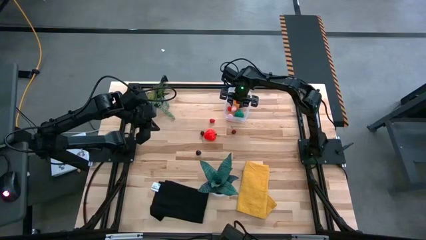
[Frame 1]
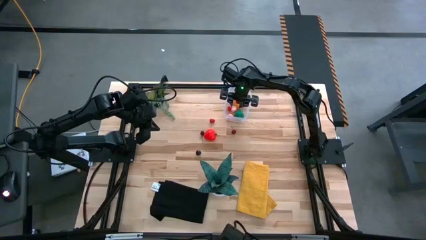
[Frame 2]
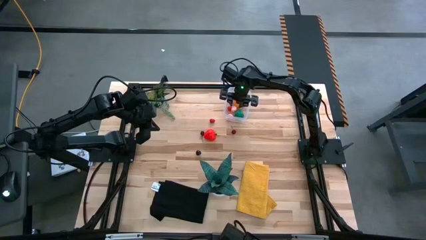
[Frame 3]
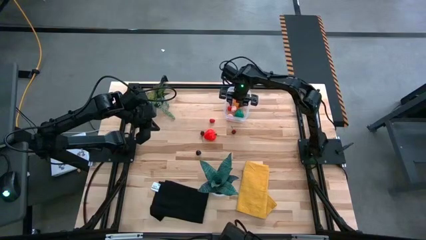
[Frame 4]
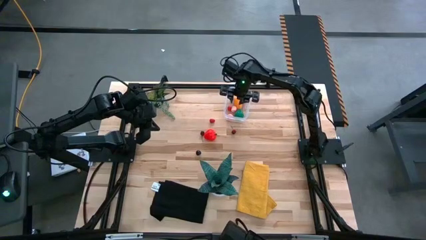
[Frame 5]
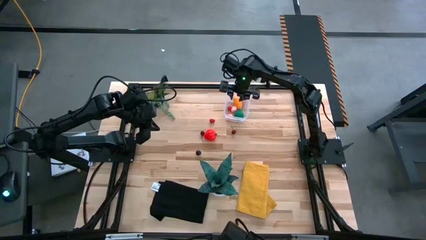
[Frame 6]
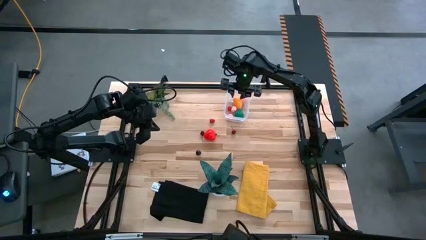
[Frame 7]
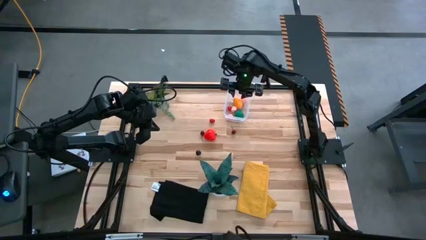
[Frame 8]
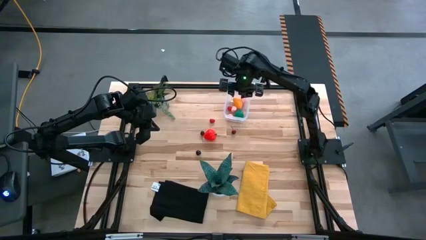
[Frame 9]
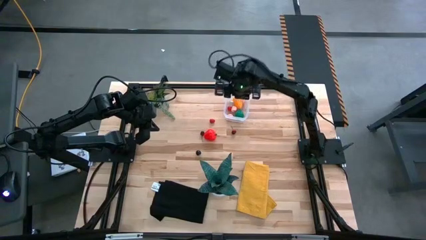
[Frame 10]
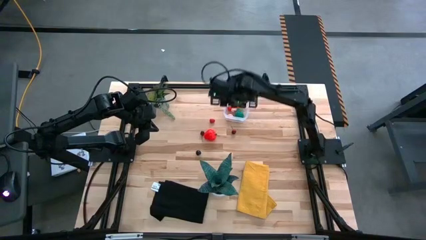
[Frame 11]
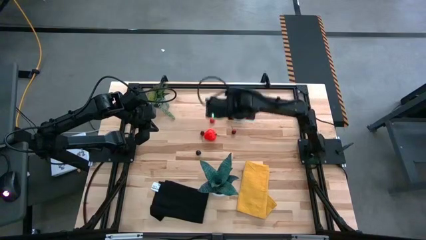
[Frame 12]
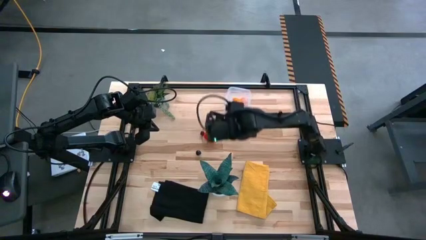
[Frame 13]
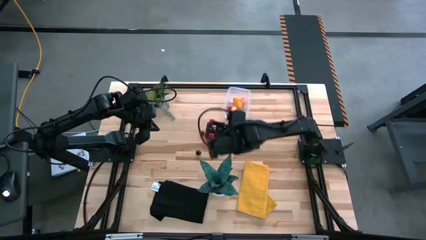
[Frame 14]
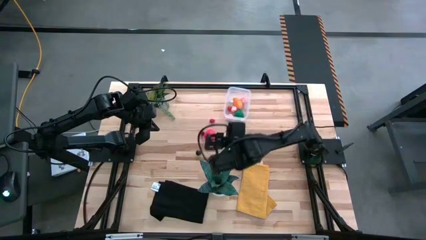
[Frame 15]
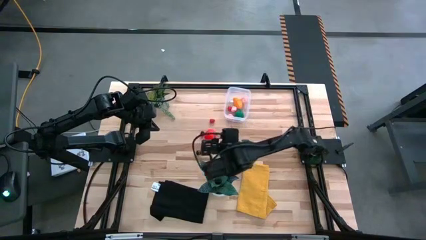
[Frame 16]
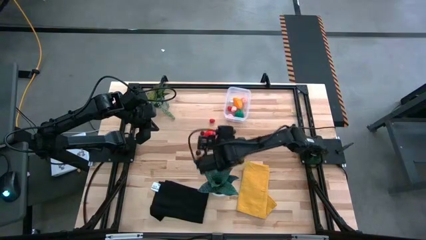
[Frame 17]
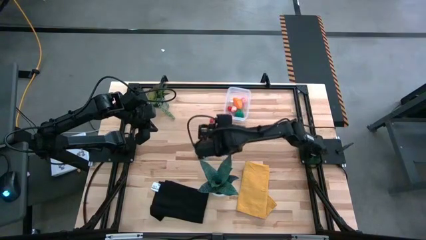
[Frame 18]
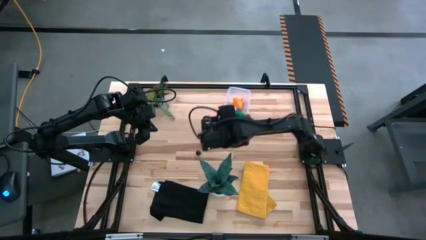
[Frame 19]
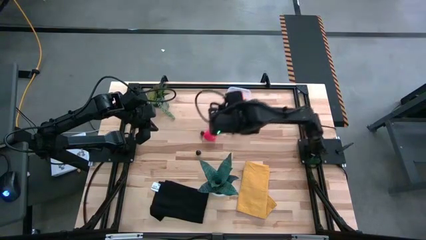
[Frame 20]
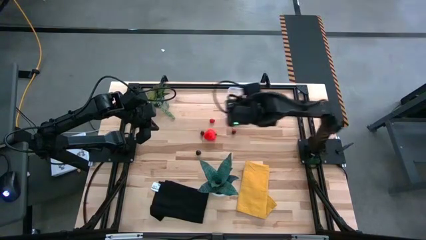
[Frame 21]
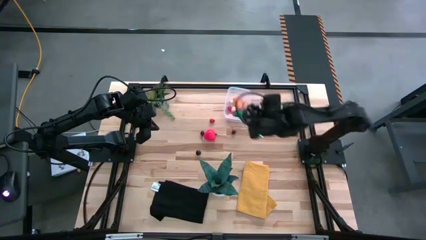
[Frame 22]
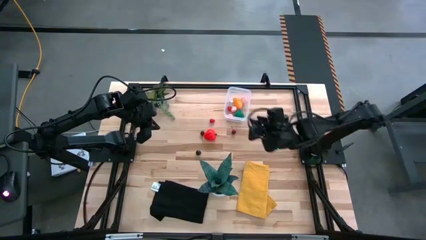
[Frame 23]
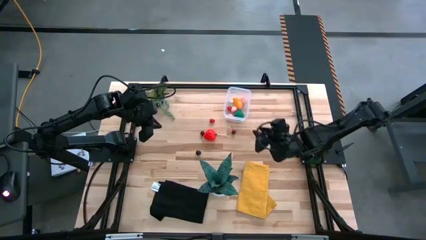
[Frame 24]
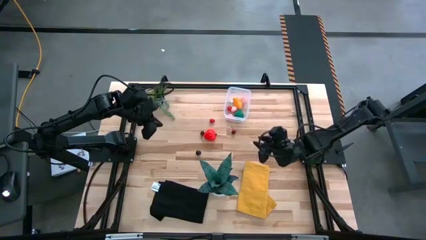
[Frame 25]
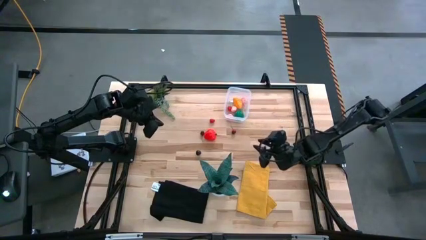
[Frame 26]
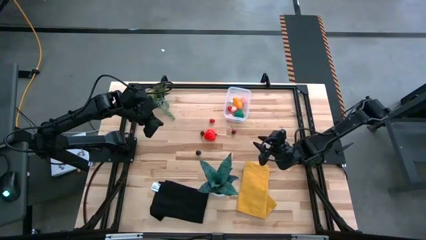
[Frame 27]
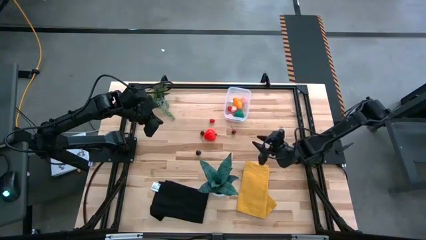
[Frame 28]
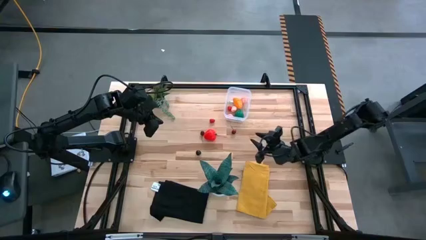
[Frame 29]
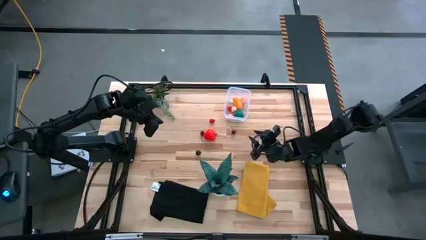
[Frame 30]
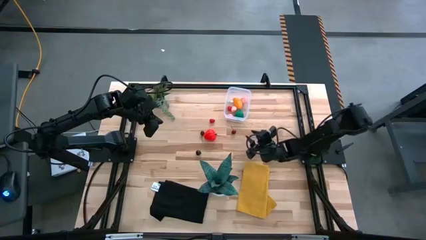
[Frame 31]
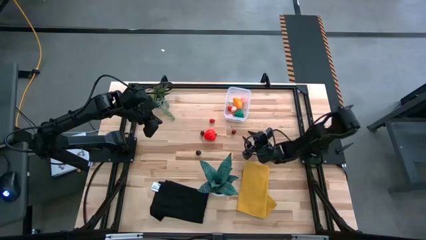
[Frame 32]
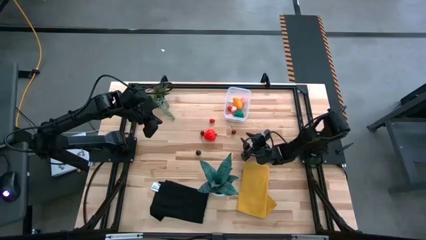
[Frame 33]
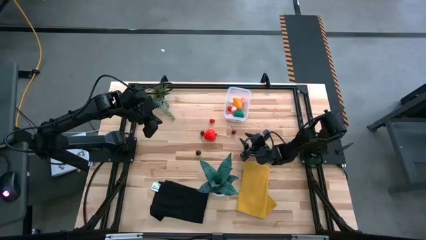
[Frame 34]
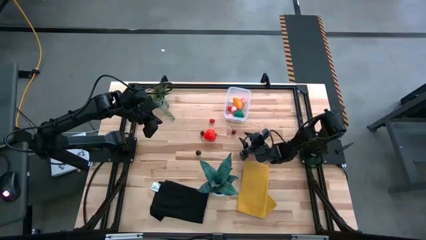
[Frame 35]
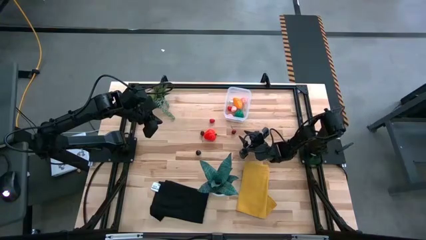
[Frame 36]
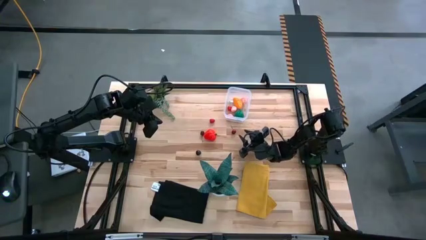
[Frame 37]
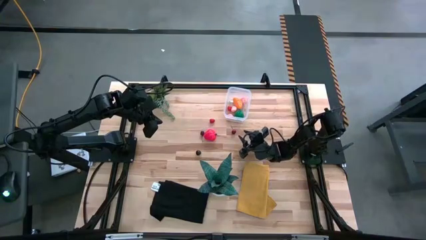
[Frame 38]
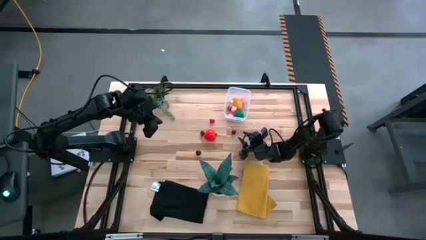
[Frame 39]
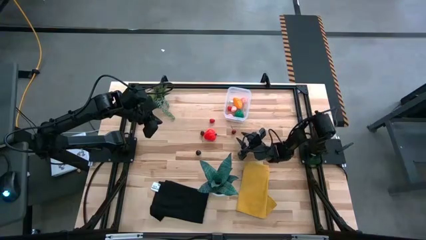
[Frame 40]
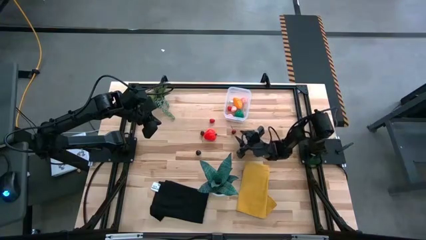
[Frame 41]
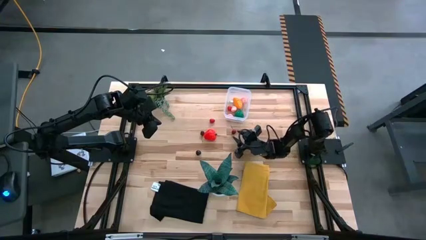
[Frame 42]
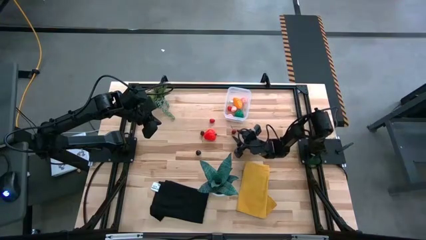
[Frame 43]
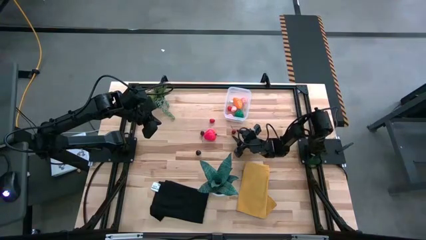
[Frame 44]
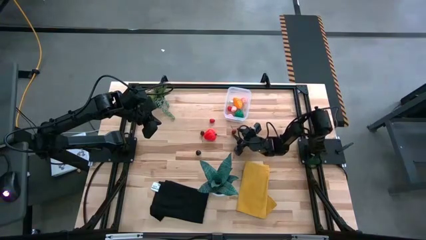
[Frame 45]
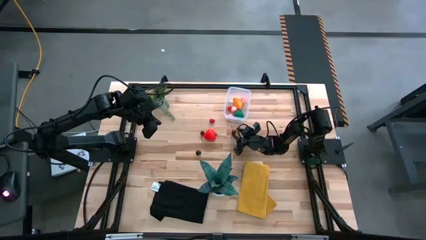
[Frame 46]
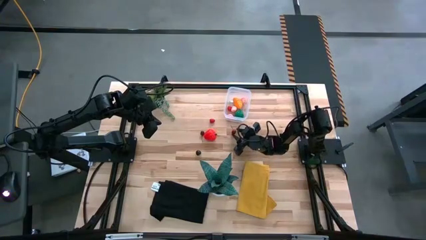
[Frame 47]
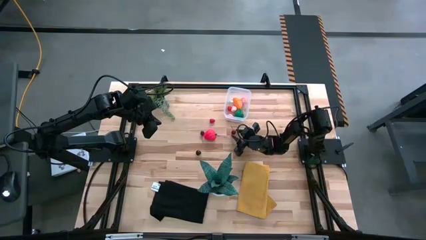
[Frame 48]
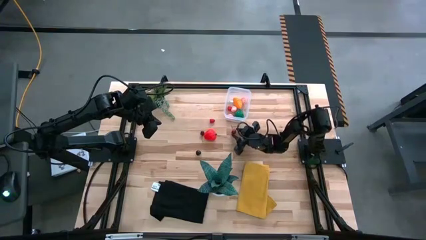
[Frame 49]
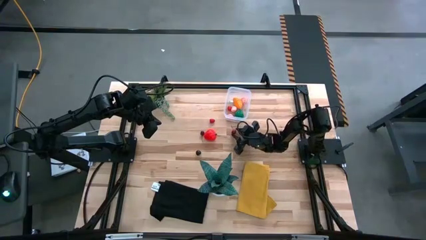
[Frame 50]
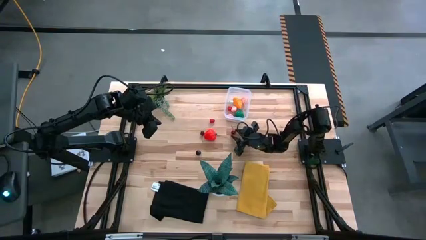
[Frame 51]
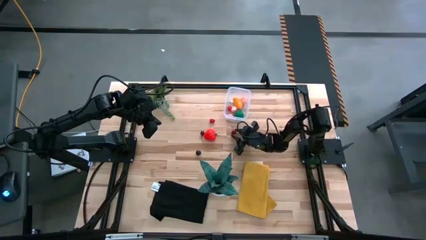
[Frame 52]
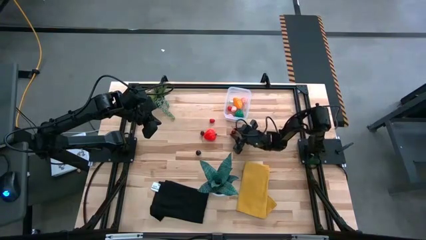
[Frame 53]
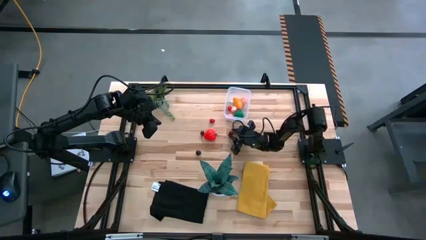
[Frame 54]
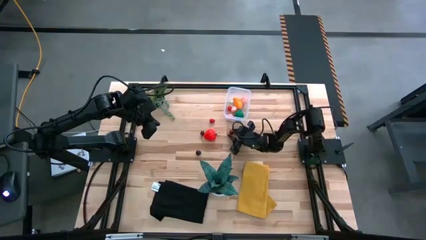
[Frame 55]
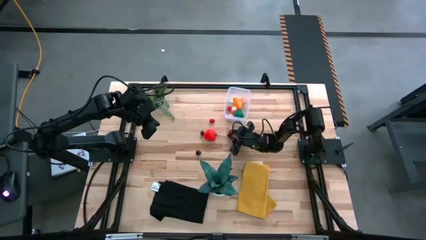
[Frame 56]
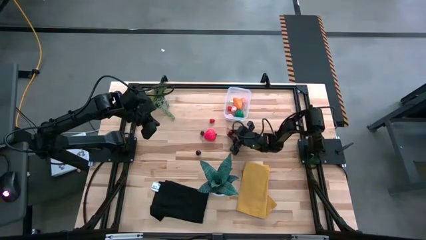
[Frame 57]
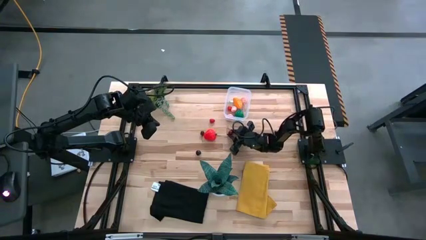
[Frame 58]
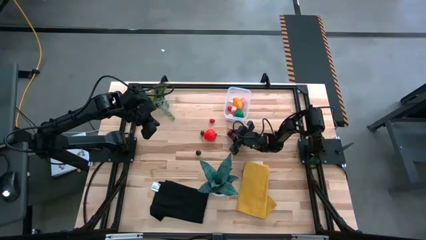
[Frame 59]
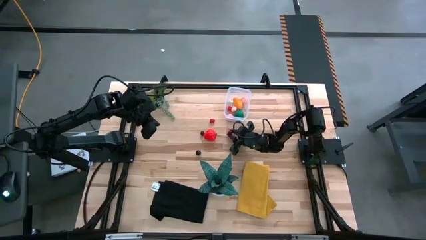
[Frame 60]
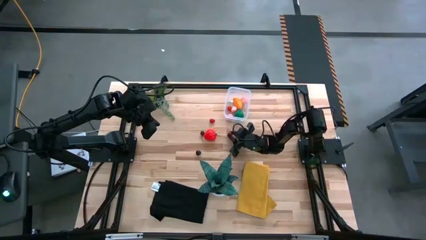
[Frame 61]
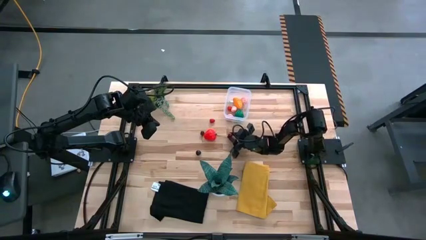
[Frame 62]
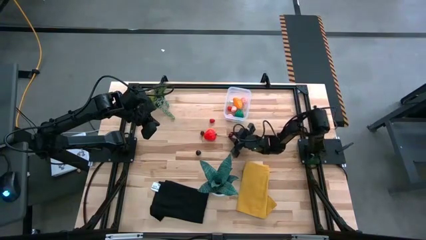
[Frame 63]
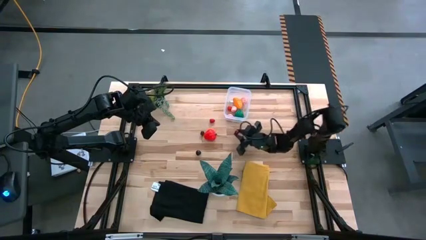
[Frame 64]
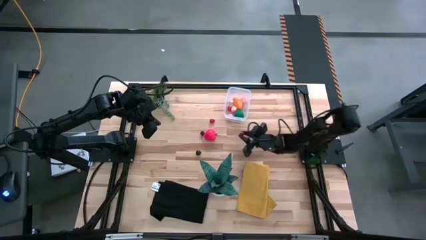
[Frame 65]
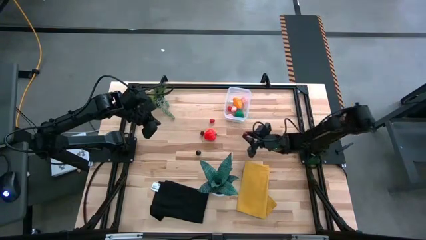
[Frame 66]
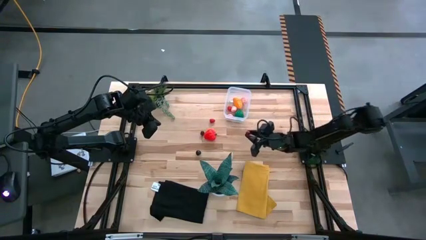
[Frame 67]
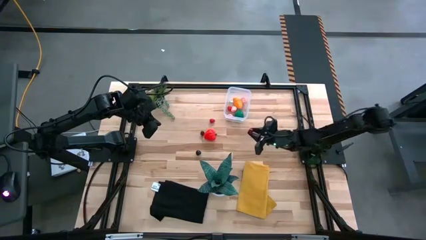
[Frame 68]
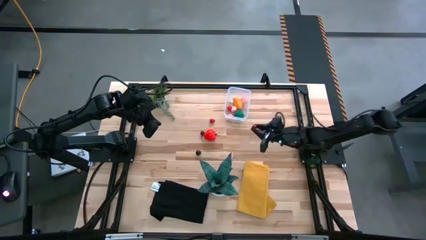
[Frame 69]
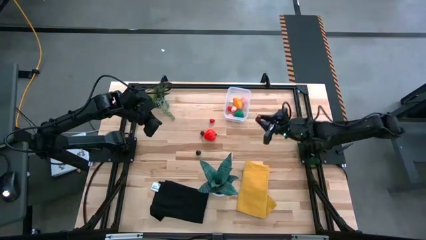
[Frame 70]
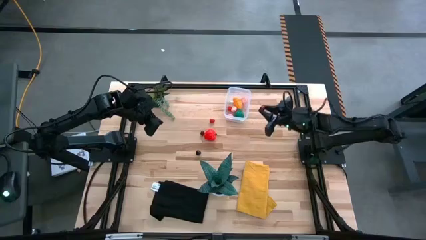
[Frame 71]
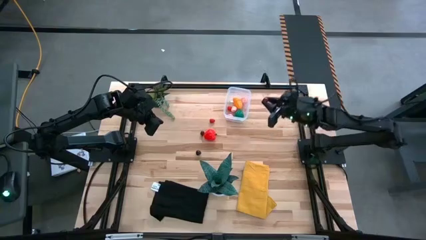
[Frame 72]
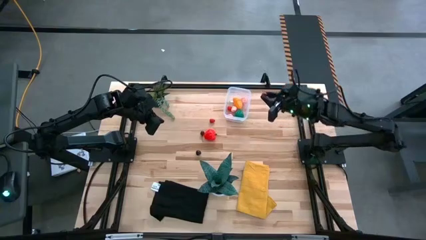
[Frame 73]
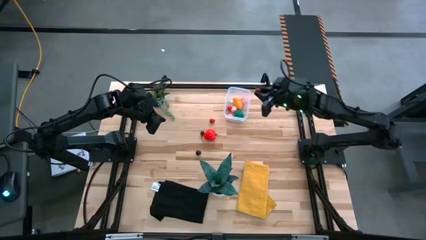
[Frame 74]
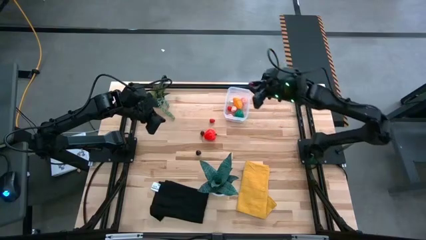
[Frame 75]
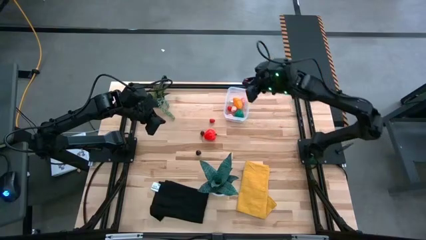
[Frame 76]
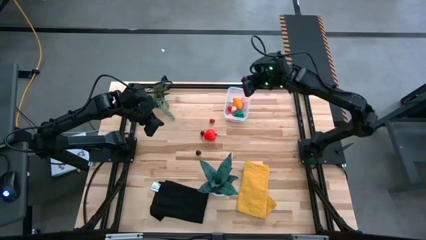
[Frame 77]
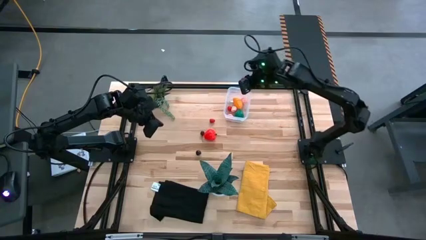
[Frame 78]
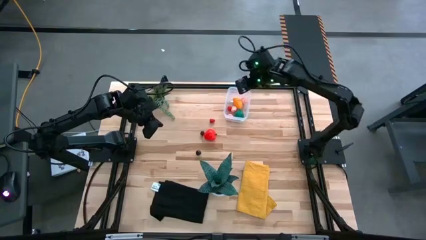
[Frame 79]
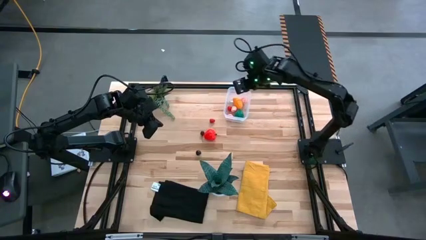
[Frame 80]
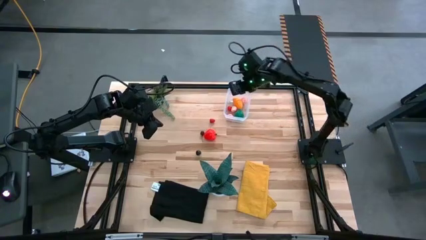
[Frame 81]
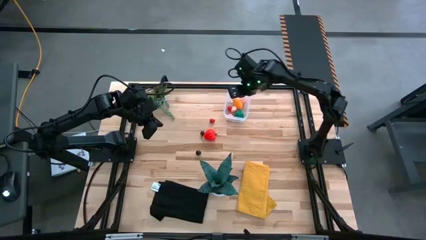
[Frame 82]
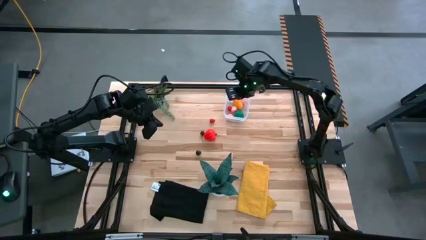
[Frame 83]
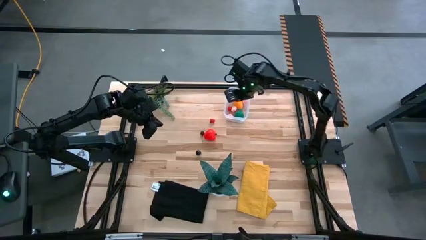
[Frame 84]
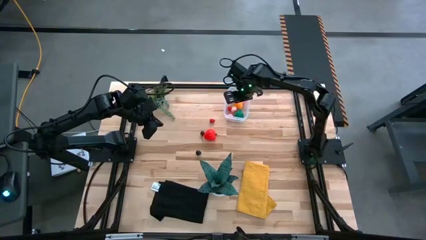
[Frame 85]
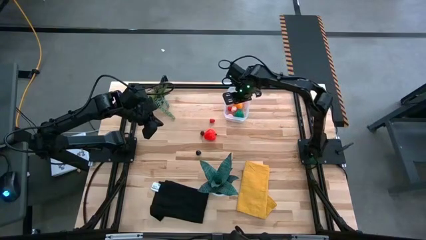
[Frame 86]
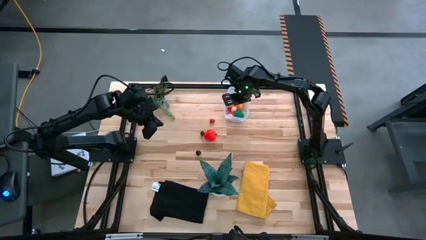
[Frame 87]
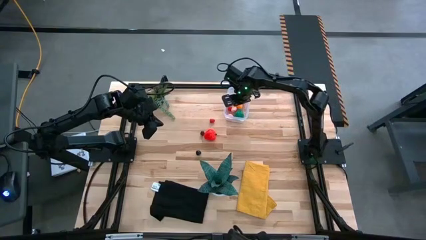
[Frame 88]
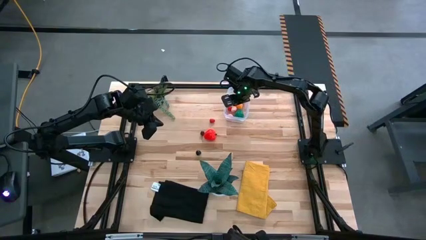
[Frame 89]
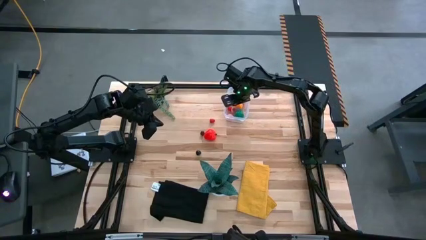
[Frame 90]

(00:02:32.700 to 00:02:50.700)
Task: Pick and placing Produce into tupperware
Put the right red cherry into the transparent container
